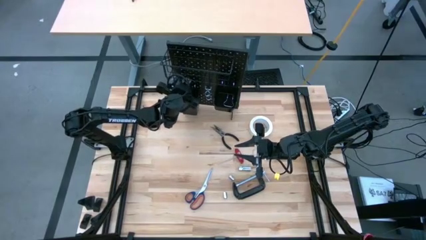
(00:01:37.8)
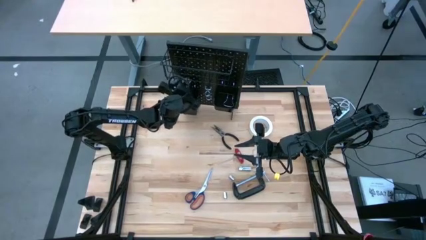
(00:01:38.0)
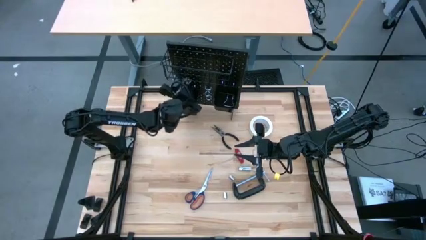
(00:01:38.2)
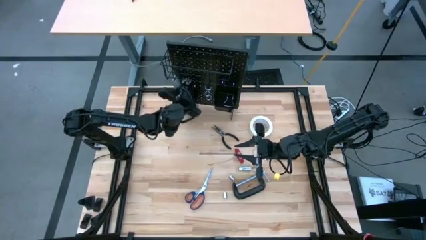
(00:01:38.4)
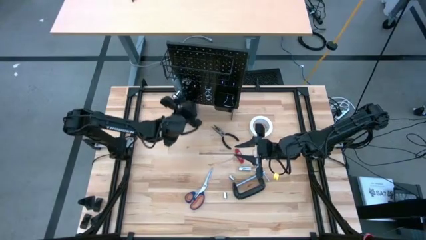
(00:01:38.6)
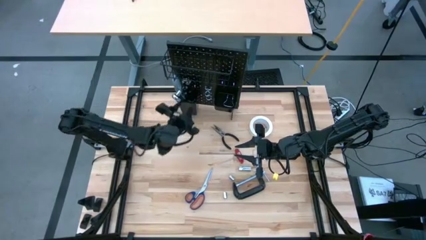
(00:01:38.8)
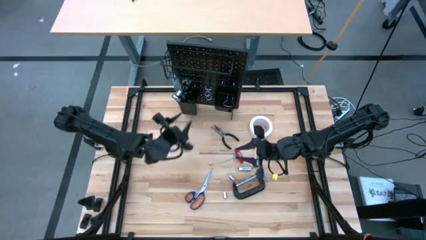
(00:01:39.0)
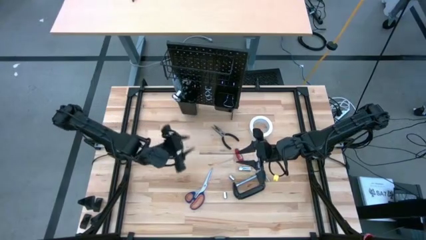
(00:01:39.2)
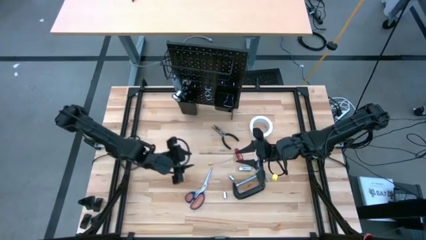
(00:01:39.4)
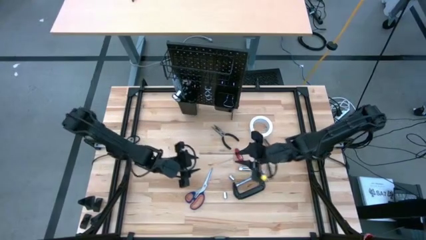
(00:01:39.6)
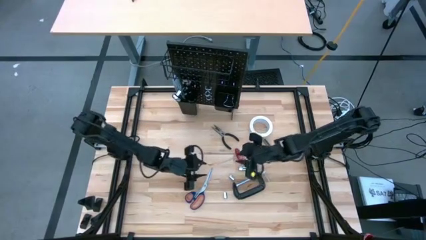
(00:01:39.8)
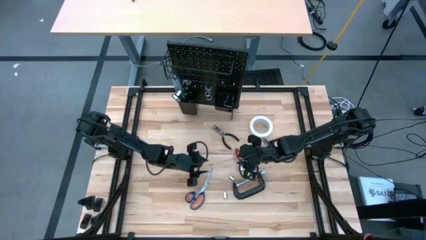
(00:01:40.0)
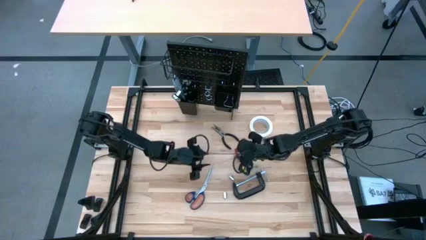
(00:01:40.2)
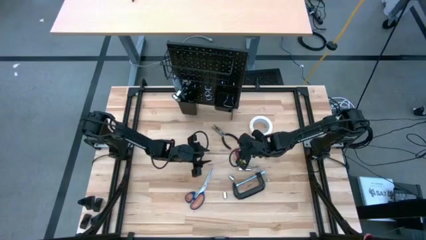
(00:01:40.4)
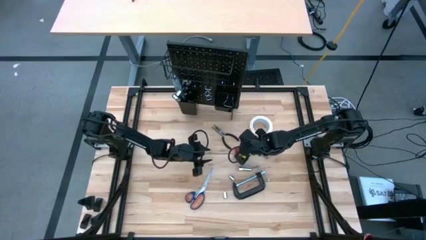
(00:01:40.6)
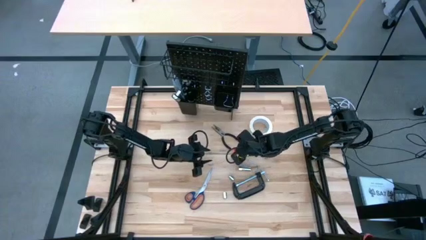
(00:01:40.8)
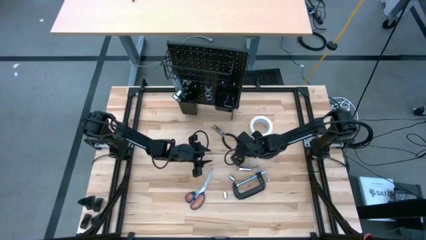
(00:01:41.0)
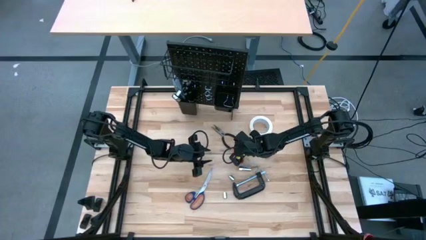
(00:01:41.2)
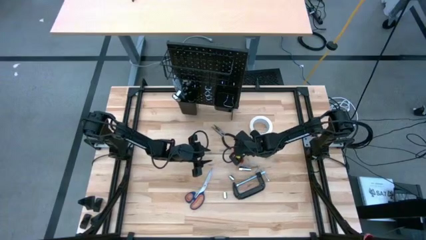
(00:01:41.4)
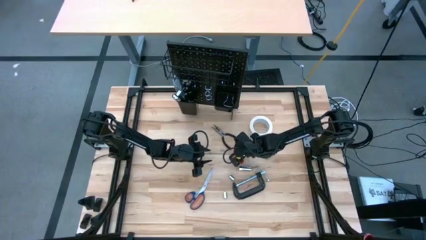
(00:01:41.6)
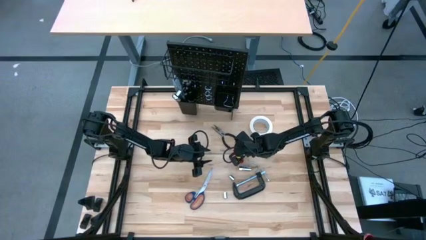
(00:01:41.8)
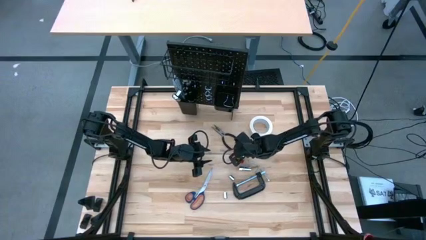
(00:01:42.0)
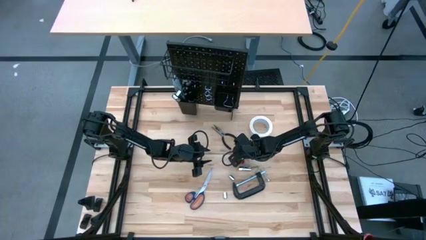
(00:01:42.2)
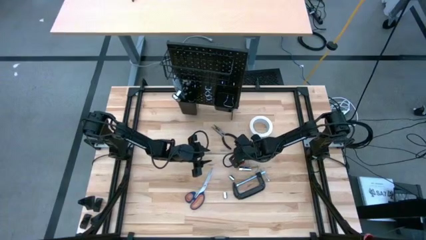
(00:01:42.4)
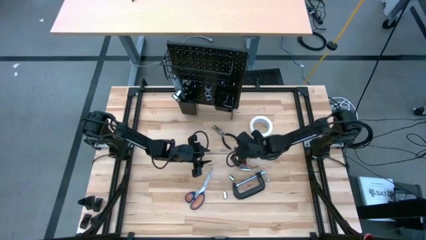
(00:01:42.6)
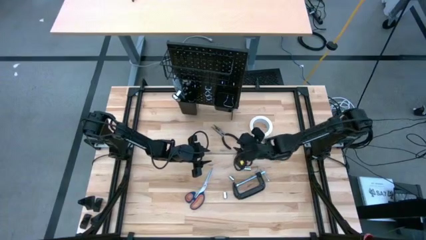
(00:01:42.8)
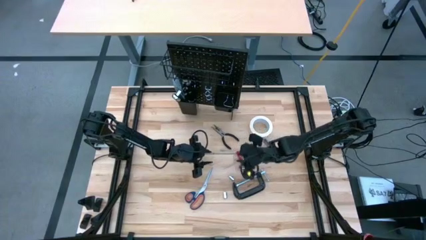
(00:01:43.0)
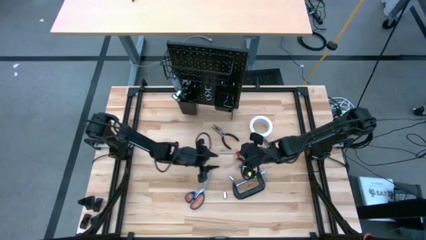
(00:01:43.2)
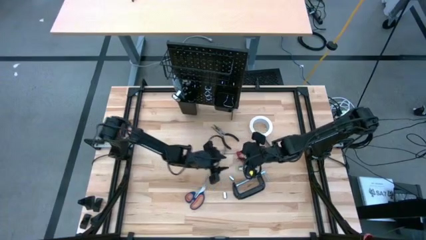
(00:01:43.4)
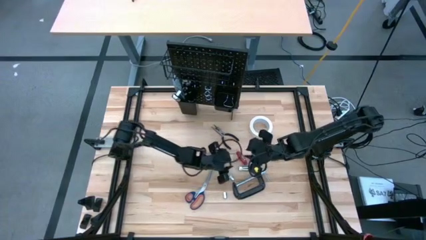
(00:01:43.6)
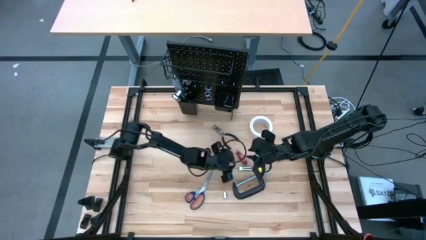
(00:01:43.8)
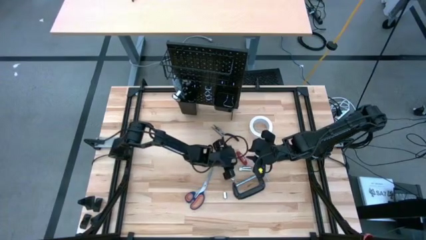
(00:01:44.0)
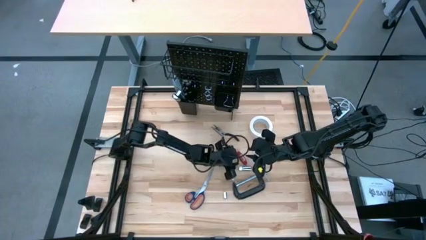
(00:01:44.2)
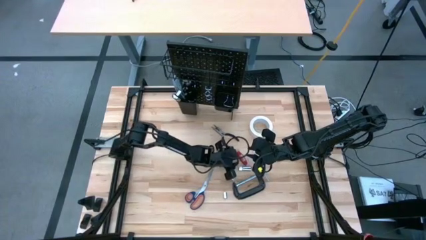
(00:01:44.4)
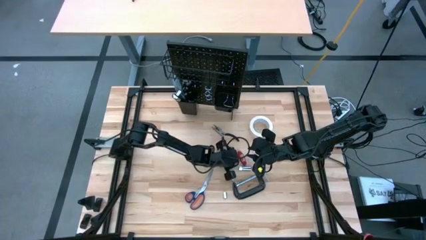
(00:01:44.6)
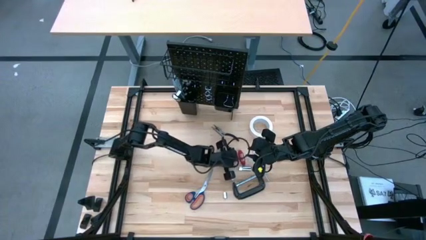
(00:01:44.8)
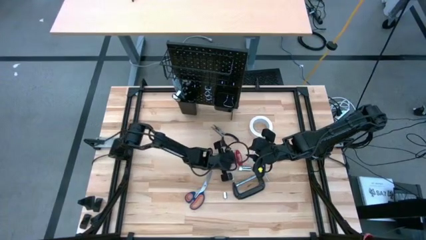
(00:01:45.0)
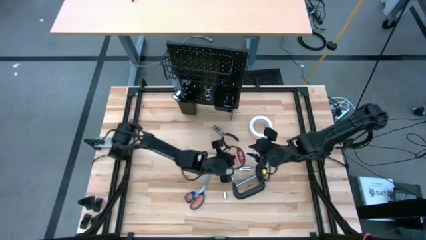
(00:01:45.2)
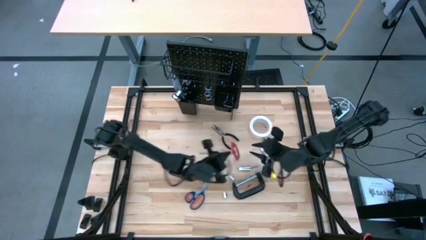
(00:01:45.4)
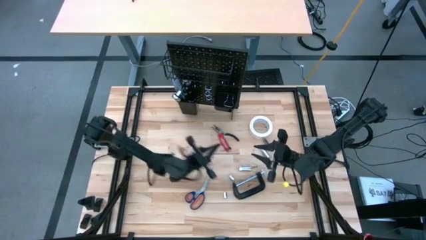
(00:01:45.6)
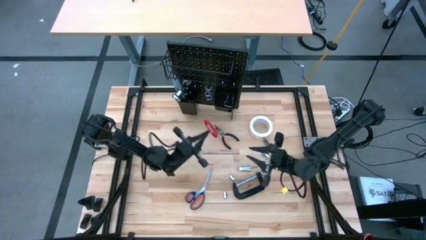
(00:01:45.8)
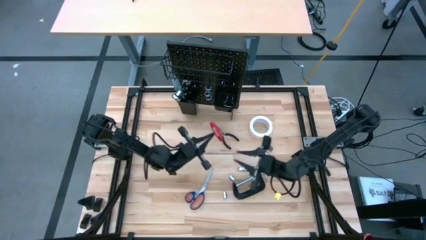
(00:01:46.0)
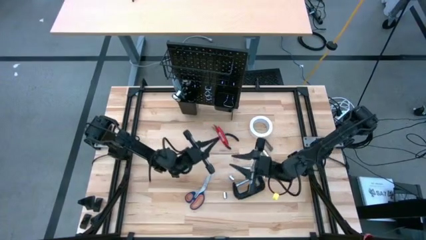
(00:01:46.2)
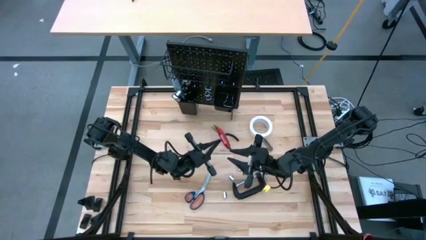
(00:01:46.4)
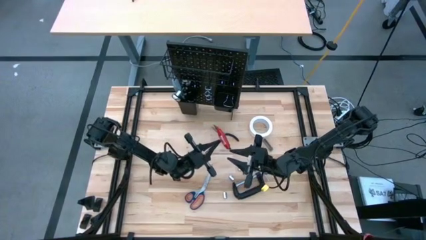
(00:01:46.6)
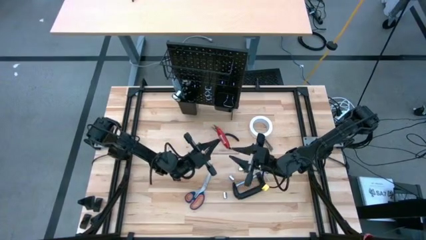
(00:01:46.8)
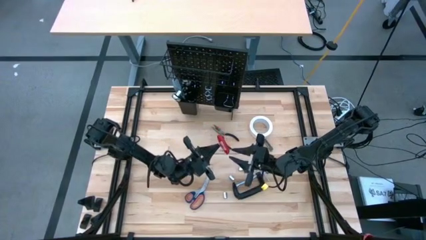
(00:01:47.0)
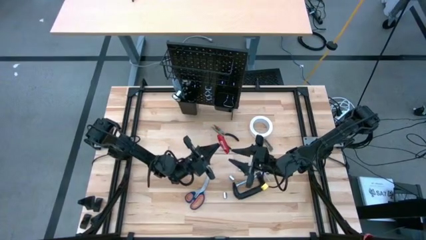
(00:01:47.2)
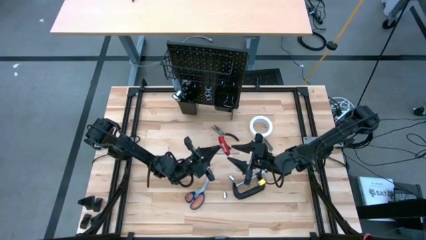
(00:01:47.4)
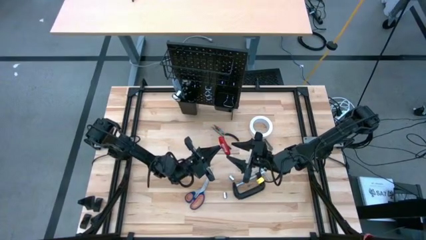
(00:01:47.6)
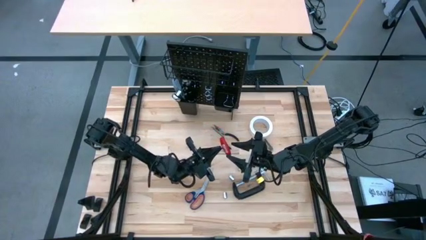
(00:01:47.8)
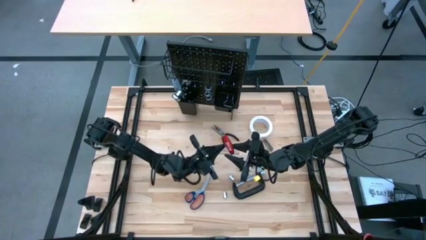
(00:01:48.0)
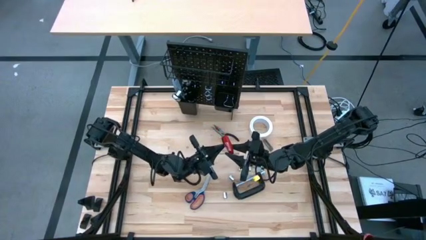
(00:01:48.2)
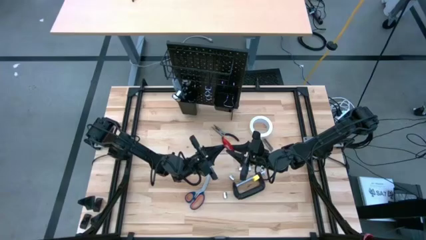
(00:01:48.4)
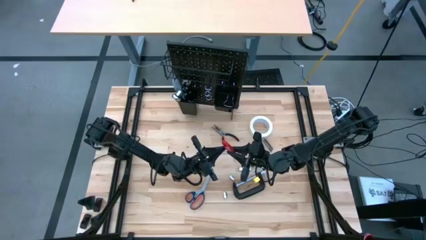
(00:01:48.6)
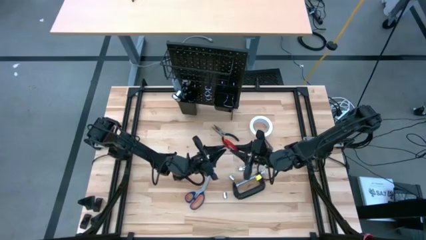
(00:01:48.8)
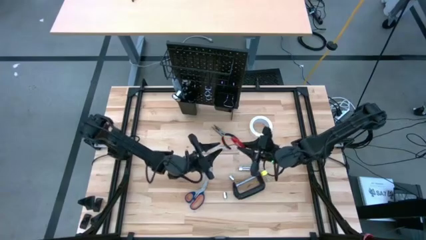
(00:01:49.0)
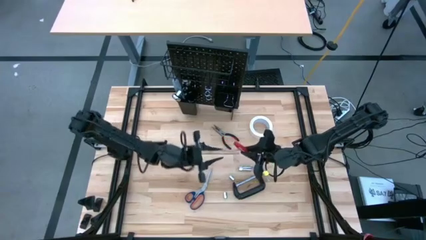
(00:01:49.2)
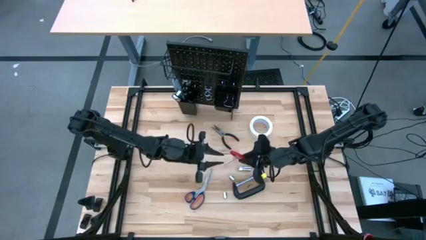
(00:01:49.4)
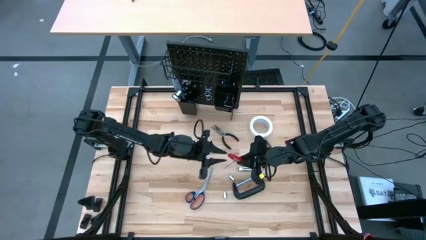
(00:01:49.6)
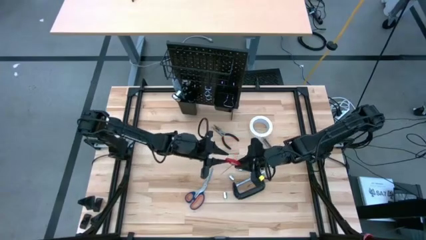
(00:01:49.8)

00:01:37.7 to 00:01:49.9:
Task: Hang tools onto peg board
Hang the red allen wrench on the peg board
